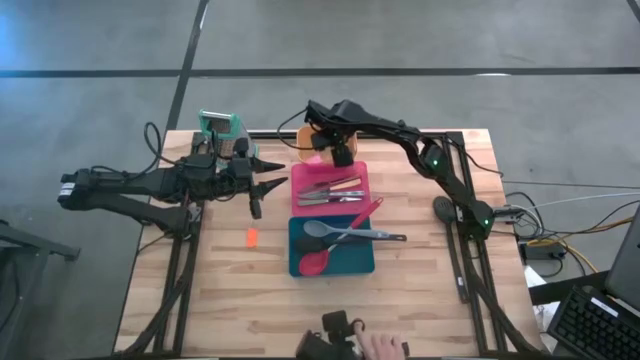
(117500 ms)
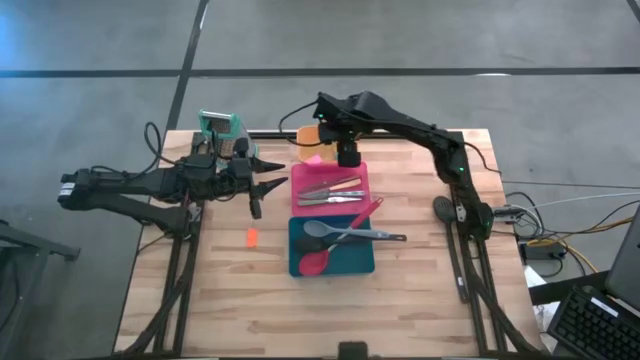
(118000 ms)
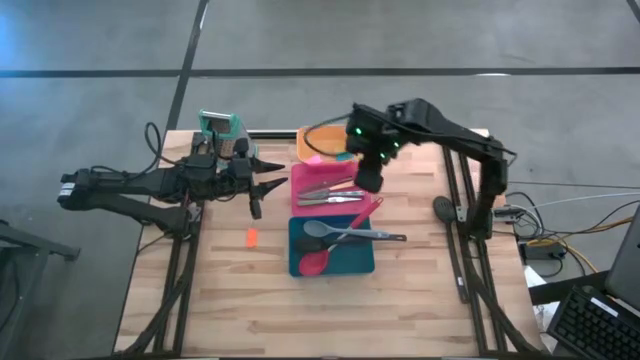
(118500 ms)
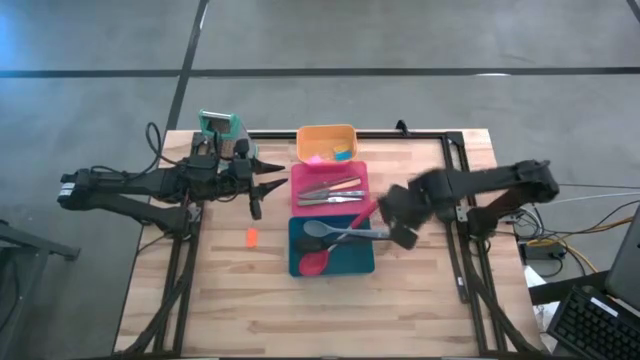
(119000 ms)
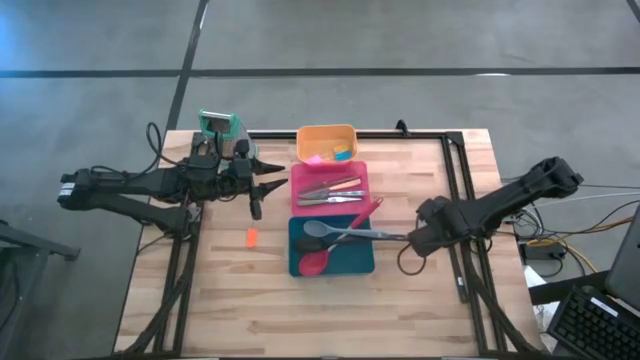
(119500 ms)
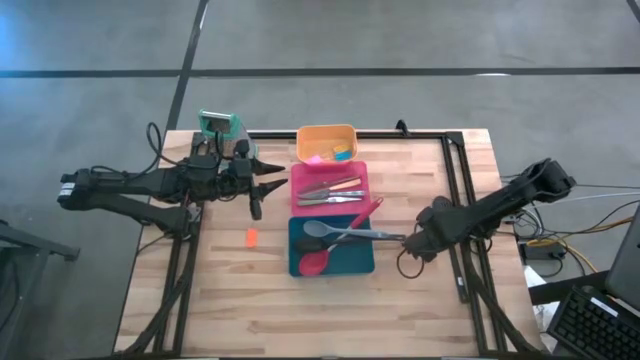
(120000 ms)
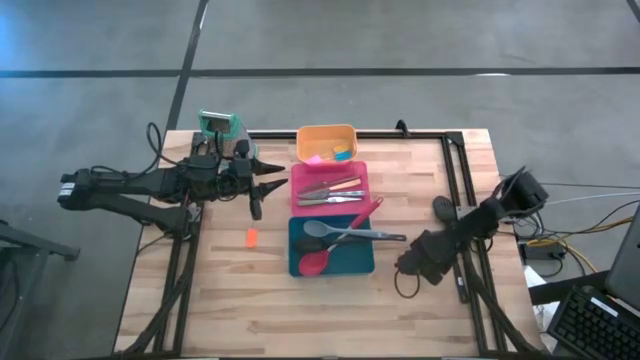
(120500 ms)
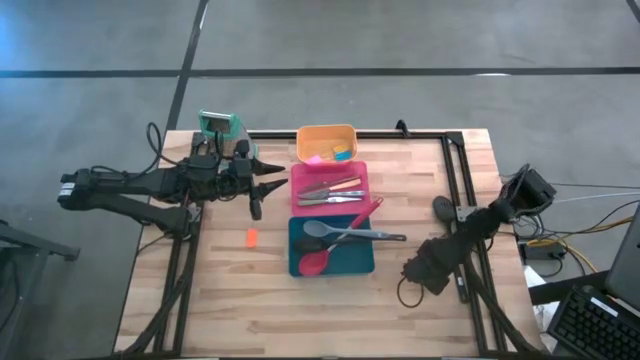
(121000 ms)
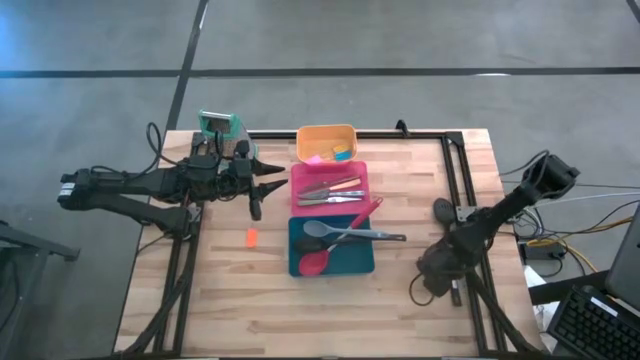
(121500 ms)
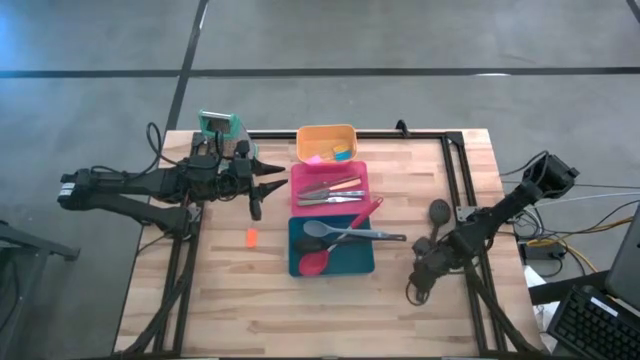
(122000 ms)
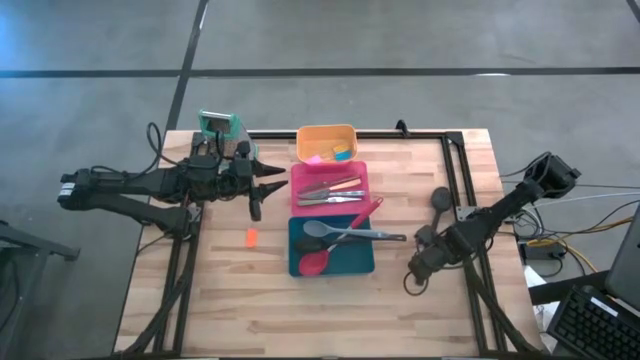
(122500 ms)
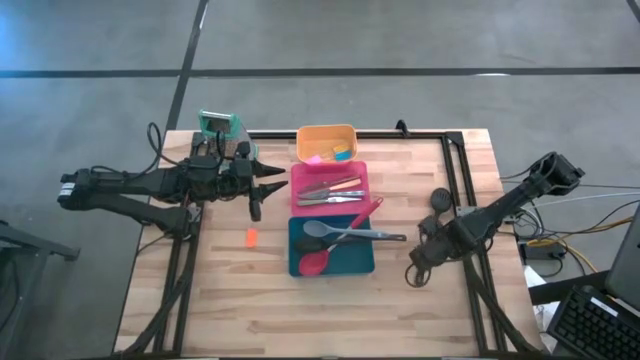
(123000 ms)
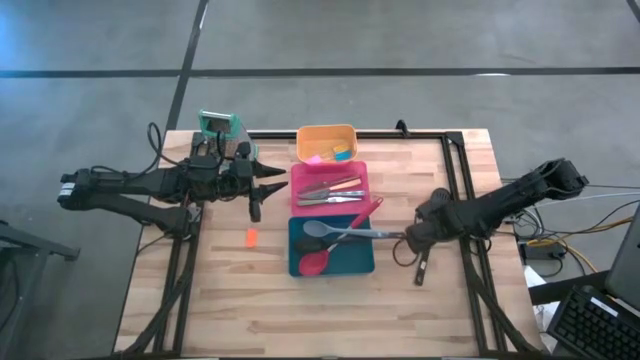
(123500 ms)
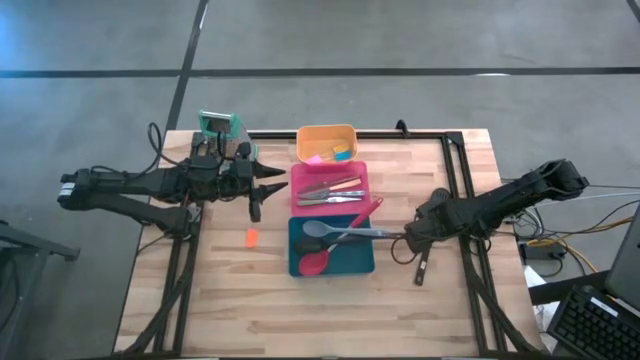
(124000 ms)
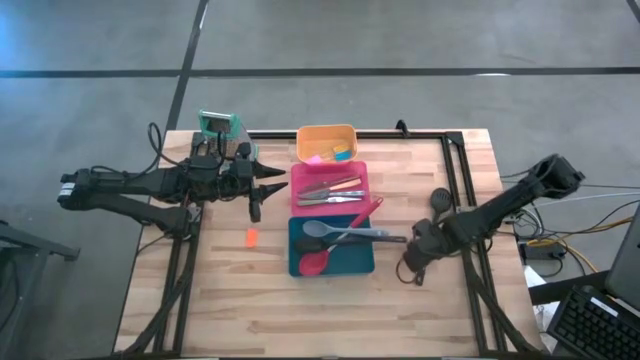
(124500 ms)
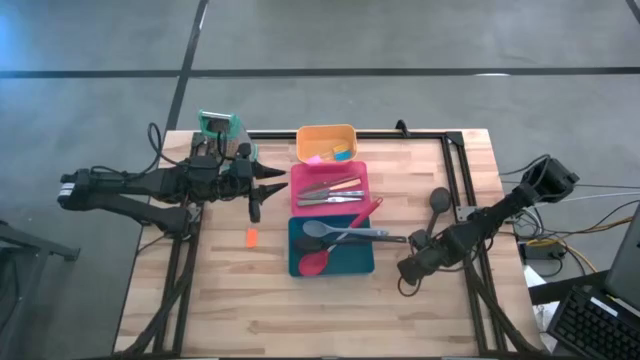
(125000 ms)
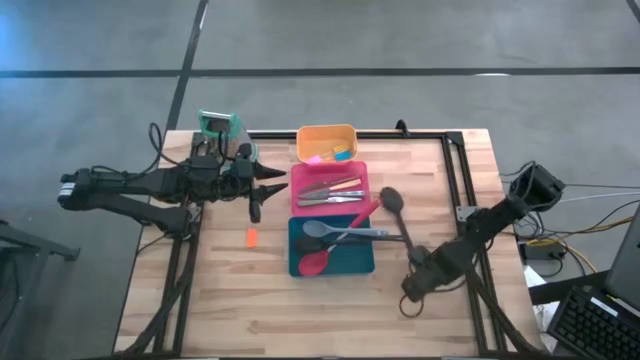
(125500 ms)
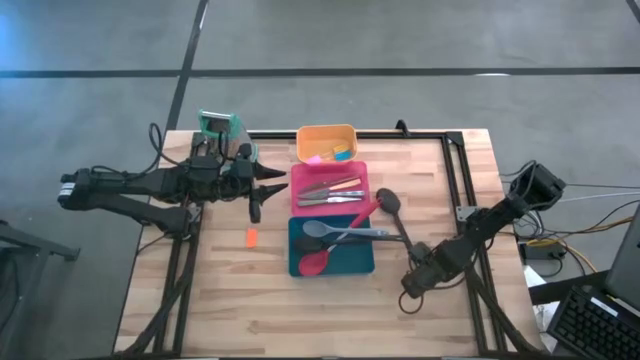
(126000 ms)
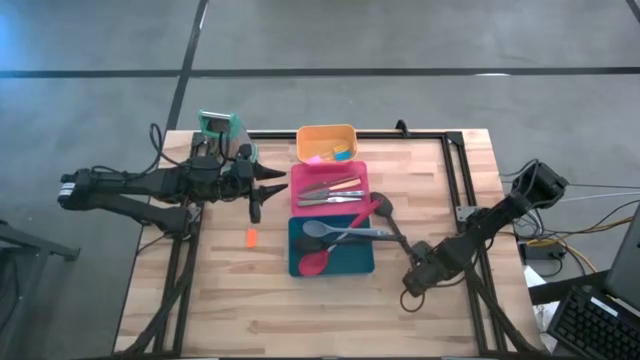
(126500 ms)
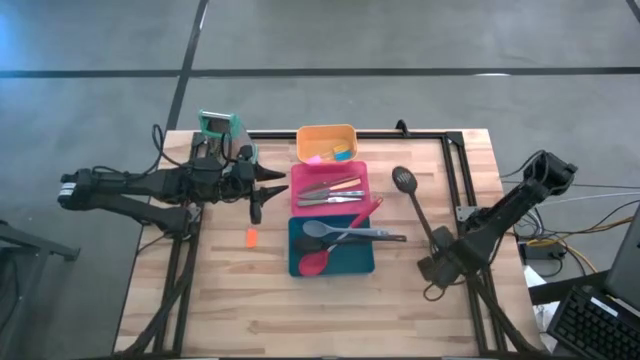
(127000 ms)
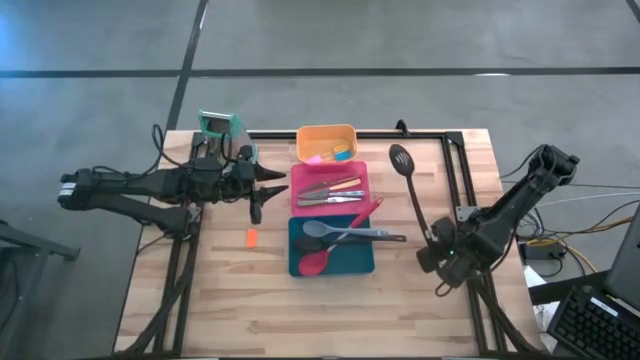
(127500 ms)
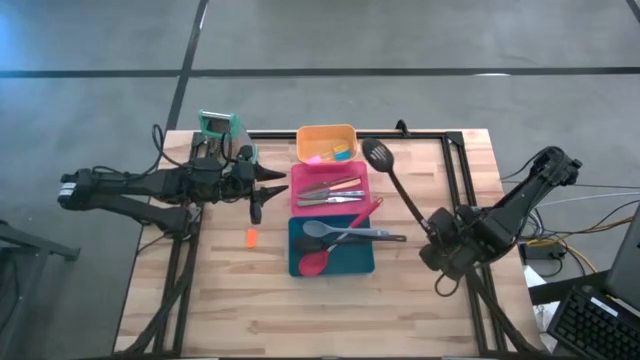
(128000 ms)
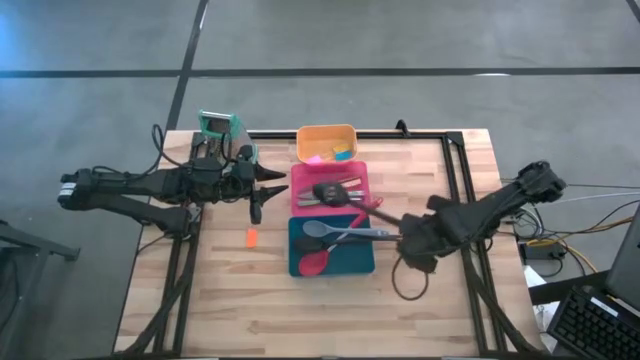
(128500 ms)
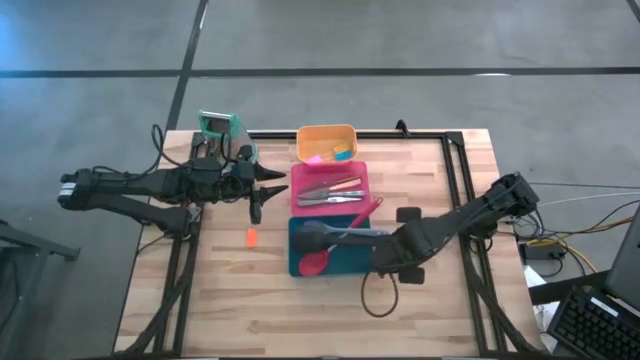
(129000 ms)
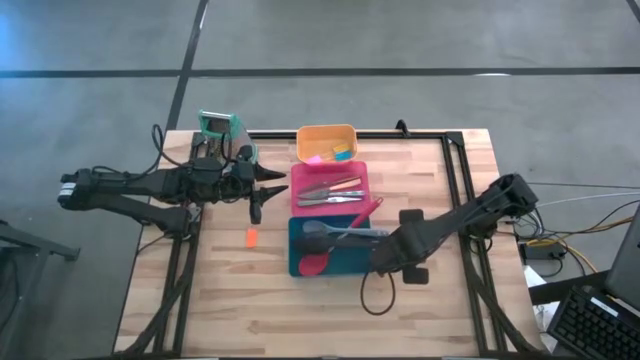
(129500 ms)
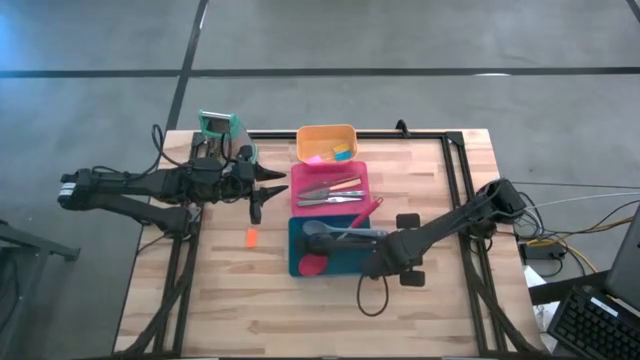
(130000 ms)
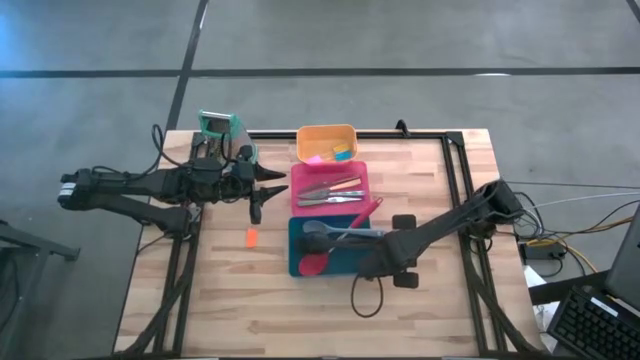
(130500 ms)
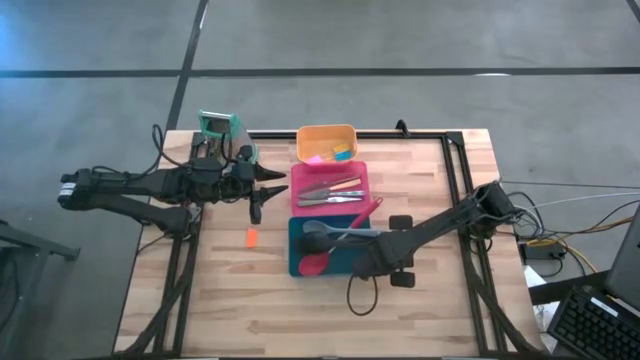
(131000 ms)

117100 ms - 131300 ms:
Task: Pick & Place Kitchen Items
Put the black spoon with hole into the blue bin

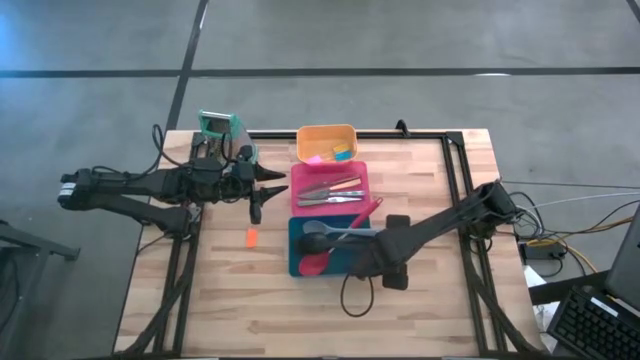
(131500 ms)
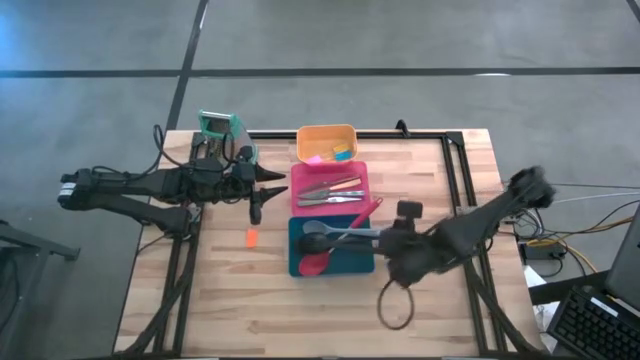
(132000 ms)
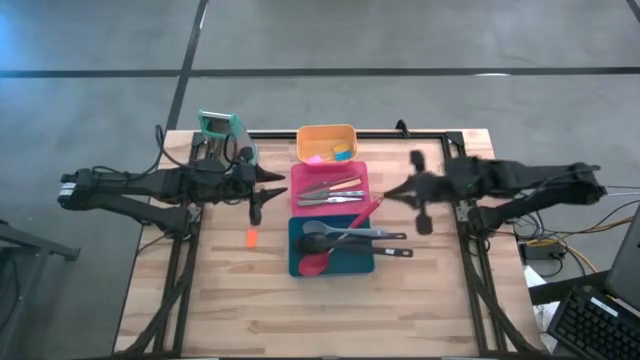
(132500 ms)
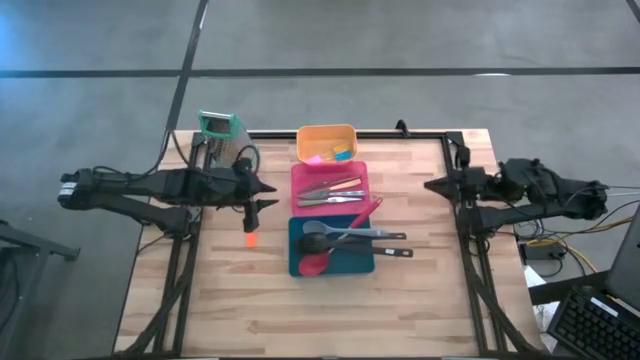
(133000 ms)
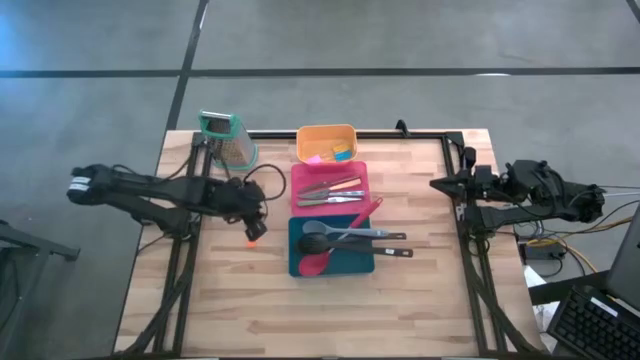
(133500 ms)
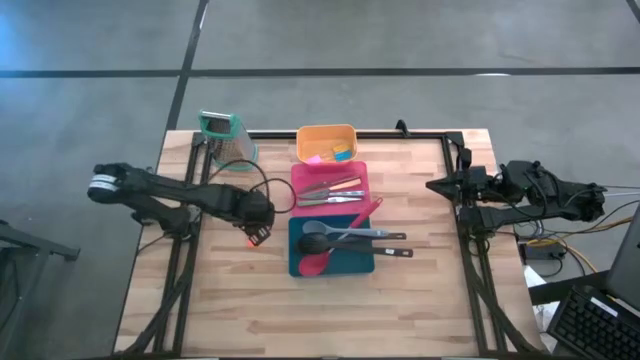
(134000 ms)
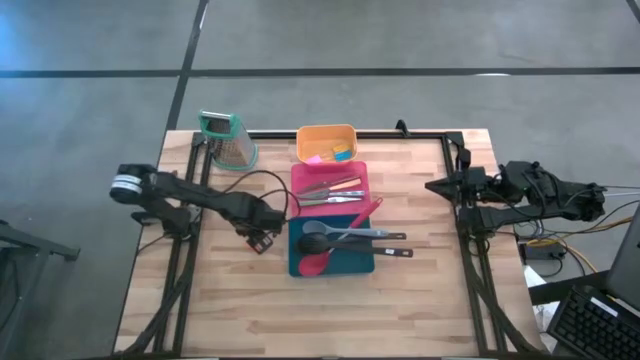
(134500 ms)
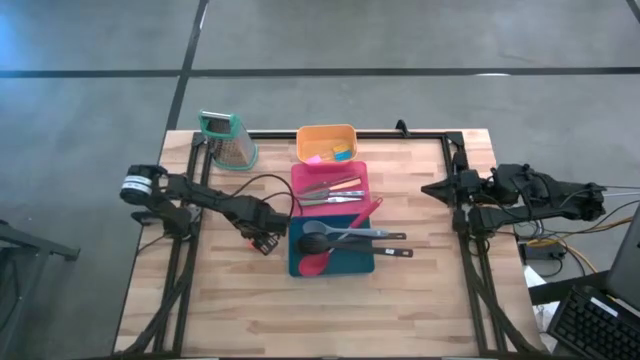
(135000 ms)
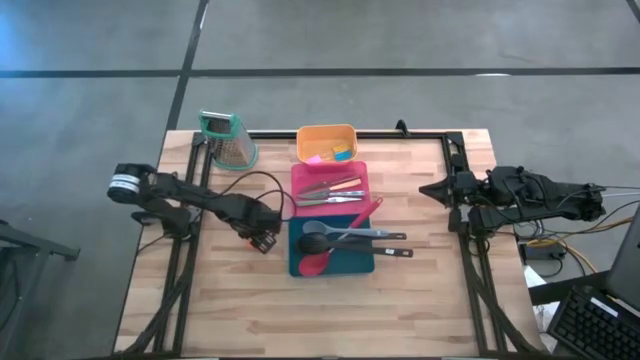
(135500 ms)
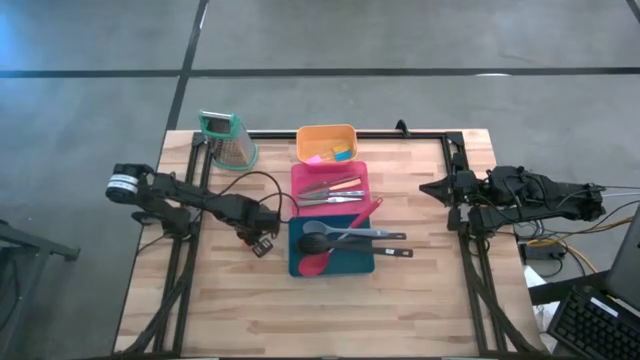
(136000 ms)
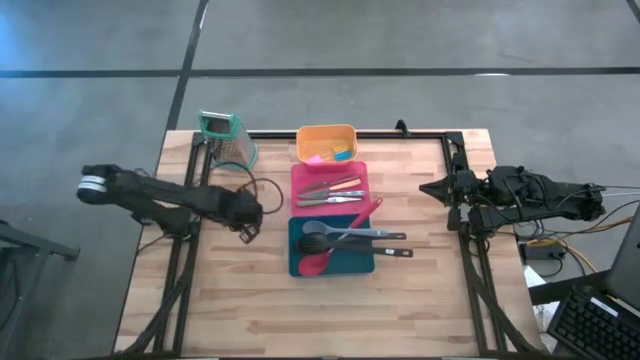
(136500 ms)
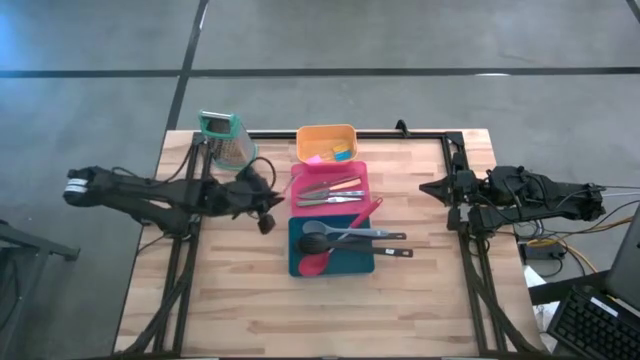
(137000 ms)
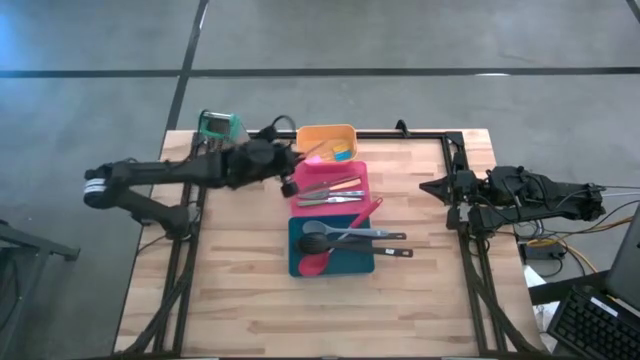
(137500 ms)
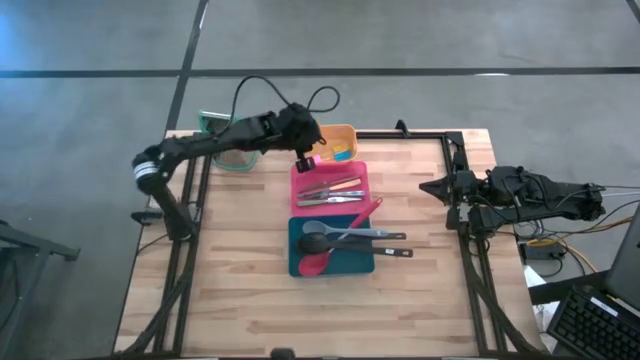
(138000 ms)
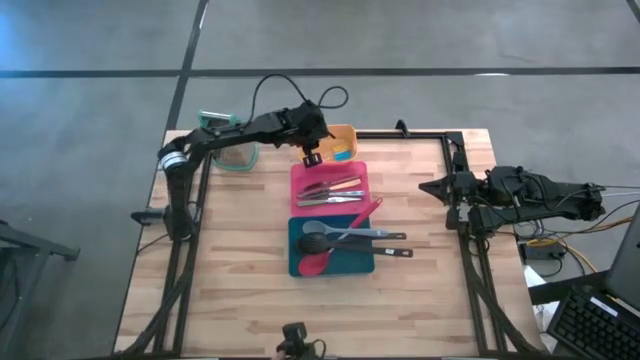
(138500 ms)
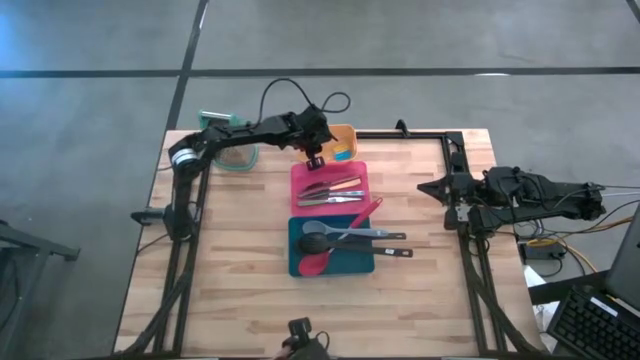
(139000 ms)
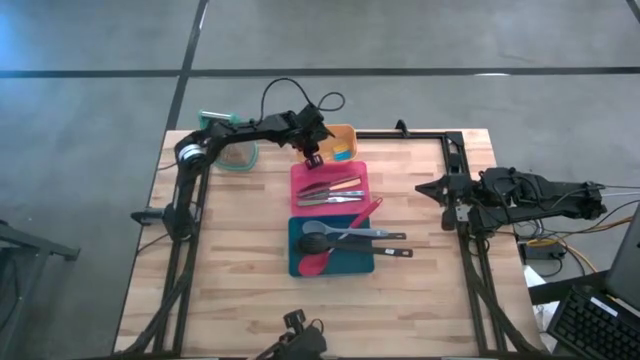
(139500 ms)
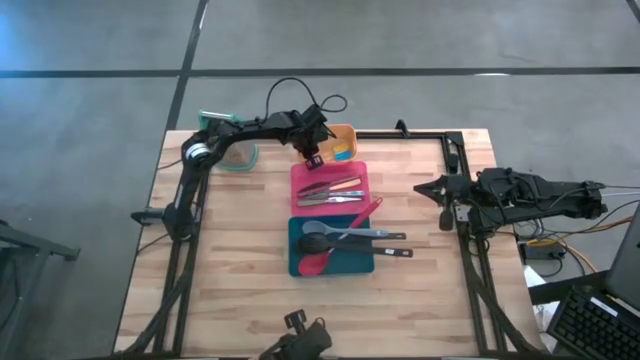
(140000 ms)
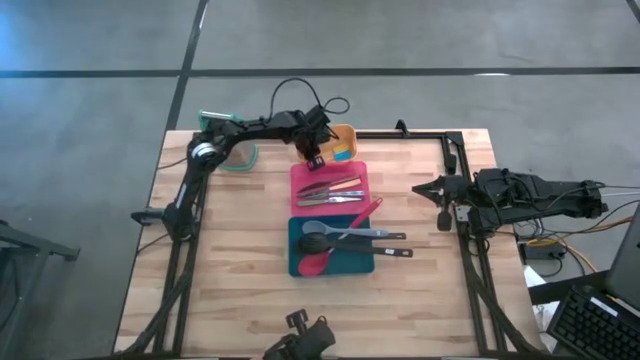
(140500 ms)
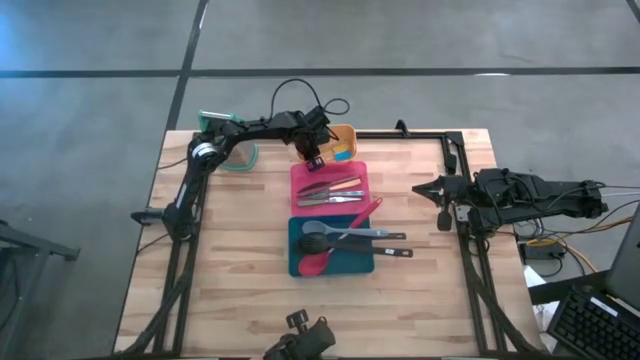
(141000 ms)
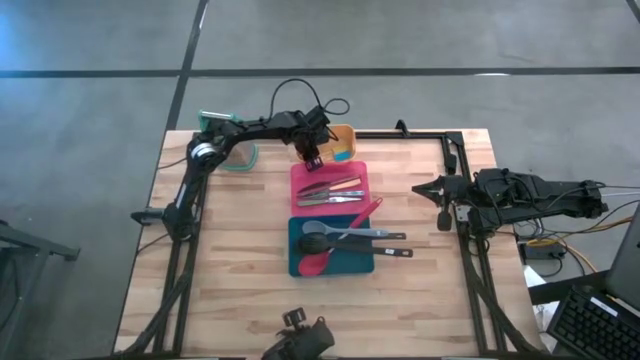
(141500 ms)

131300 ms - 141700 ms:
Put the orange spatula into the yellow bin
